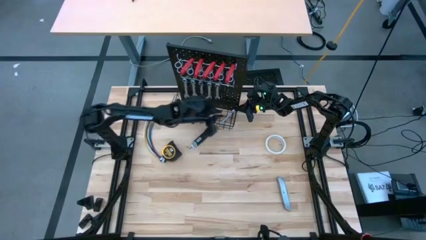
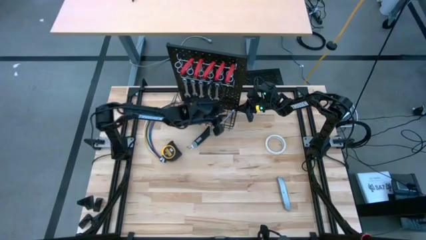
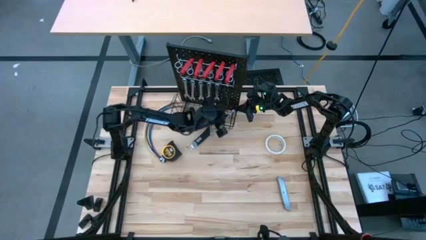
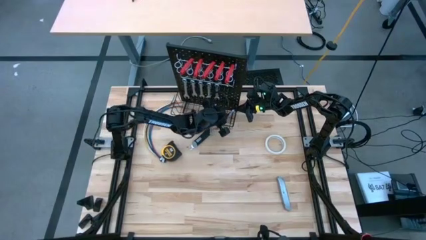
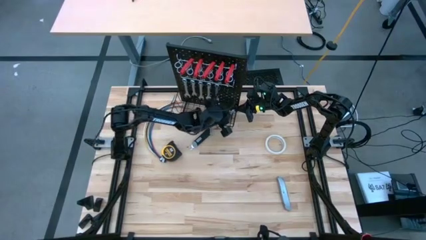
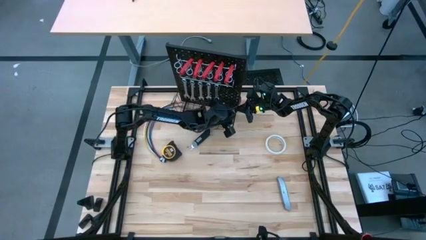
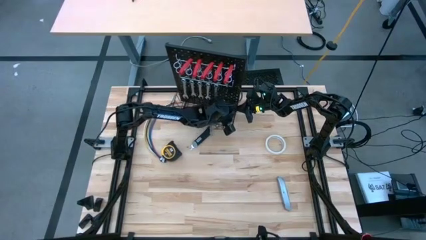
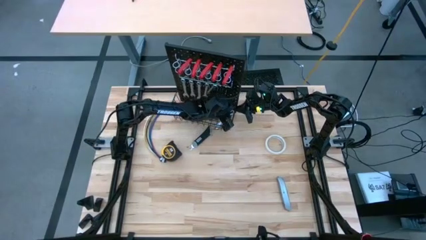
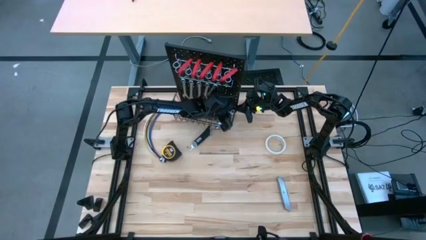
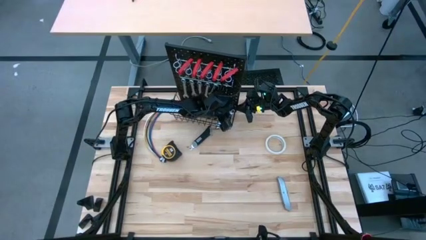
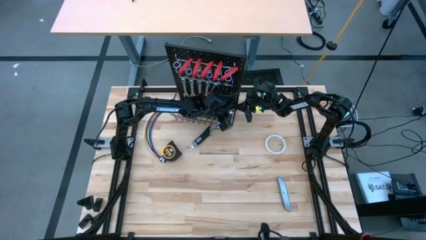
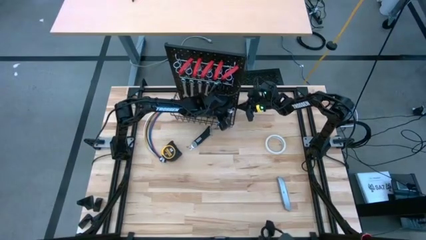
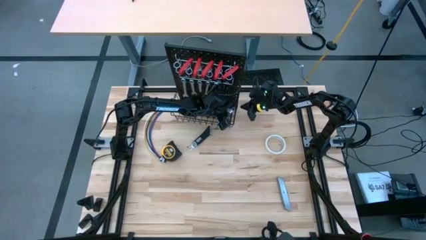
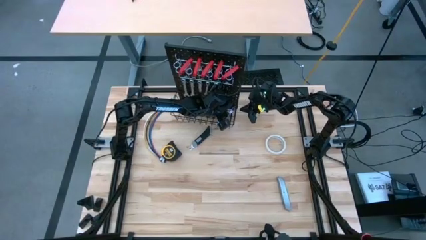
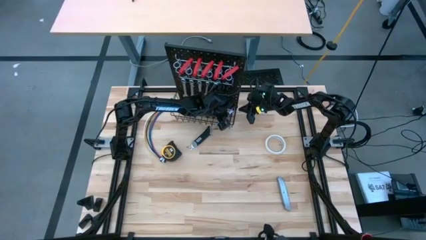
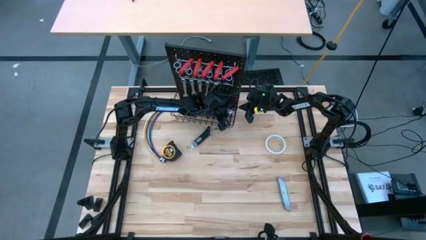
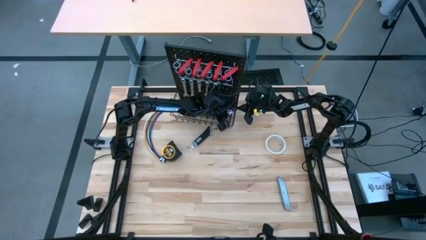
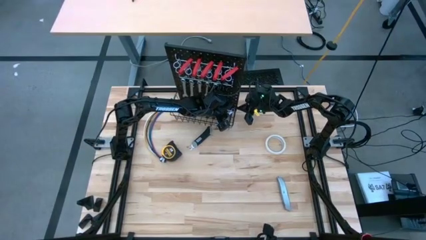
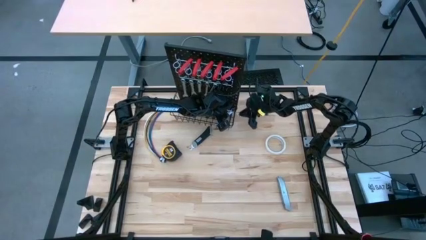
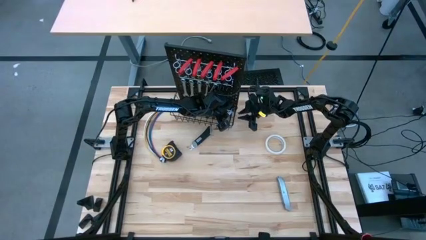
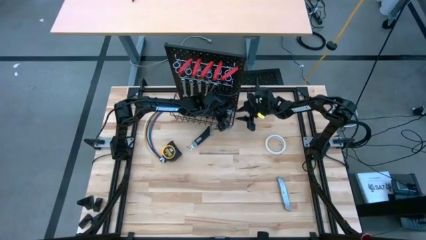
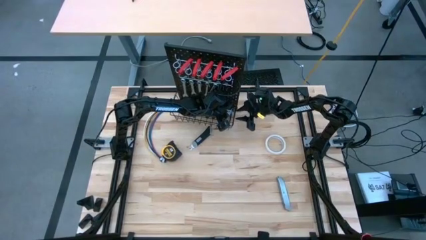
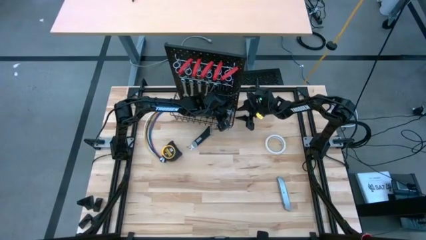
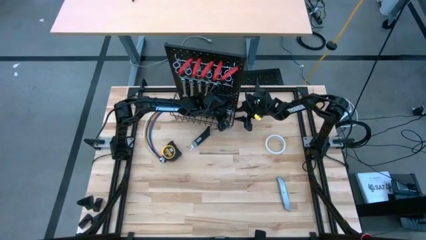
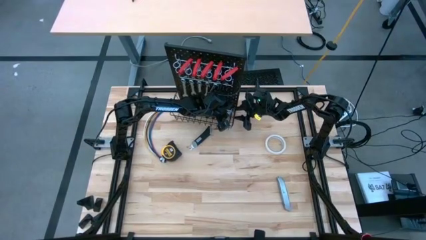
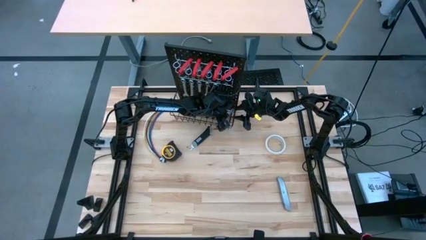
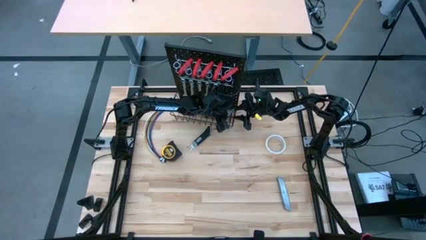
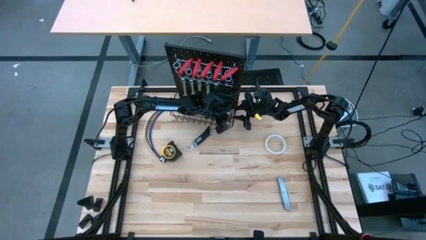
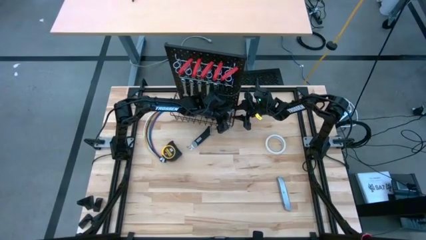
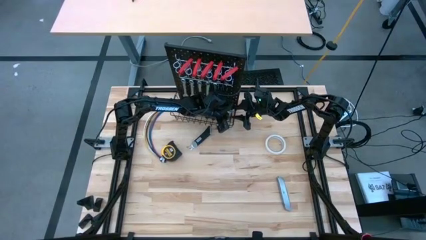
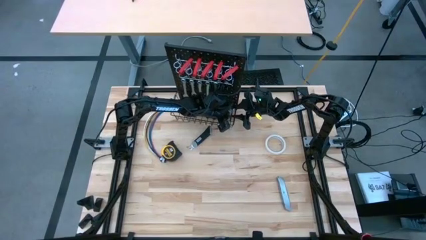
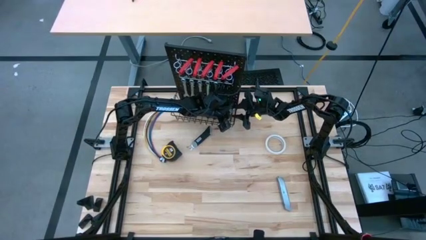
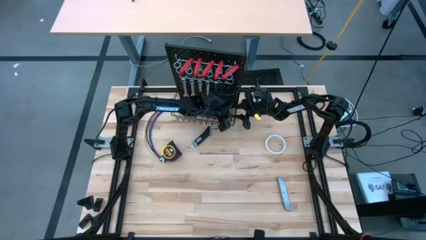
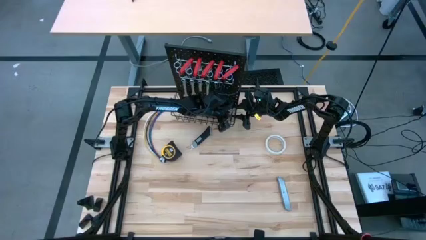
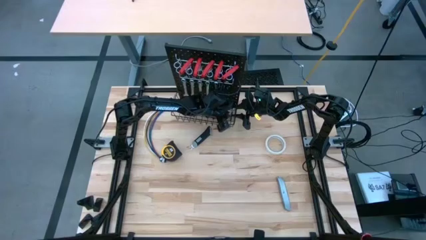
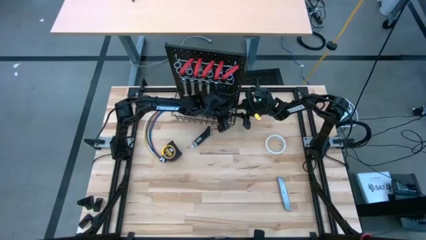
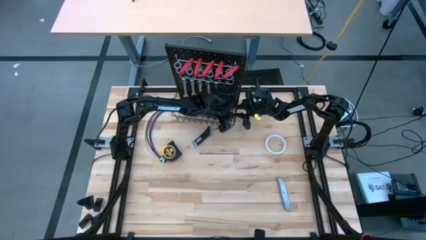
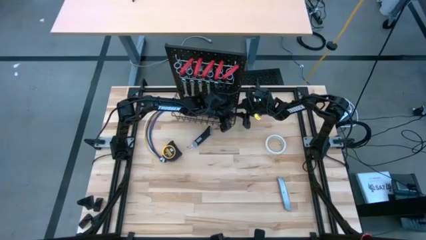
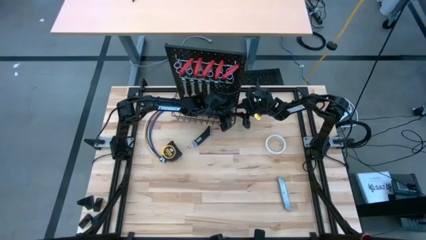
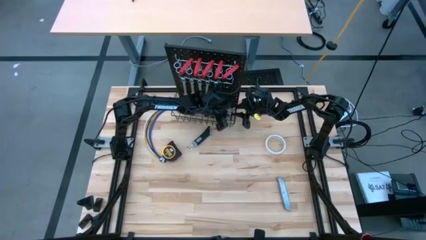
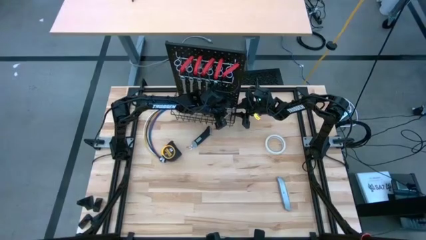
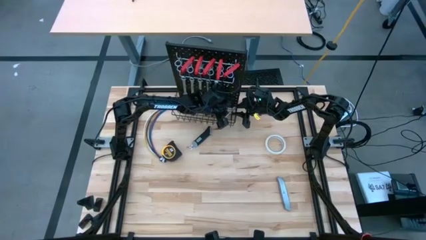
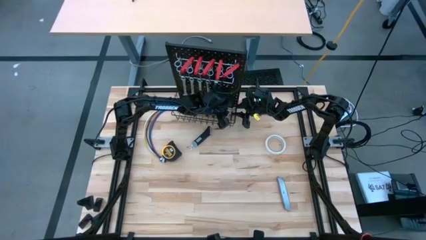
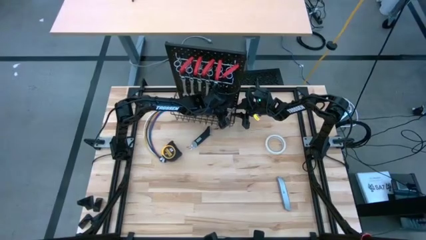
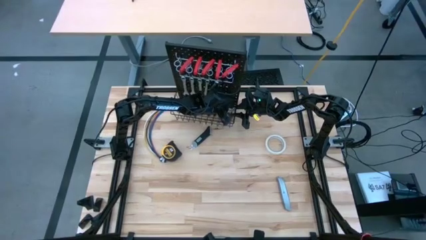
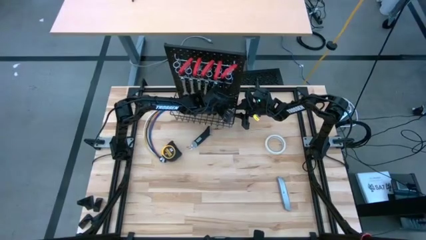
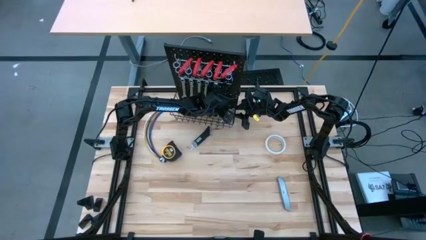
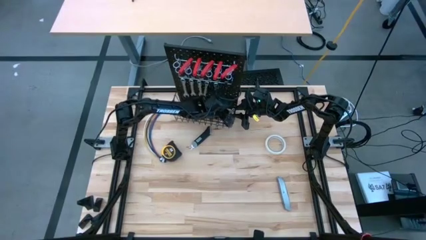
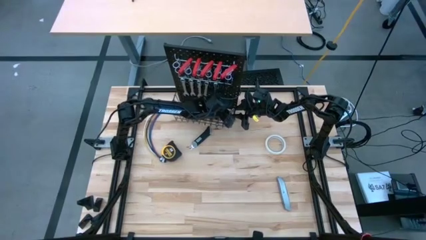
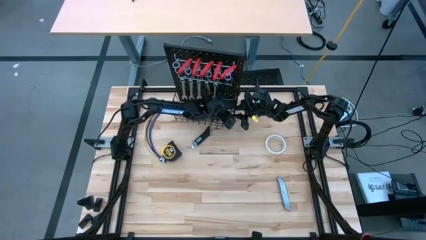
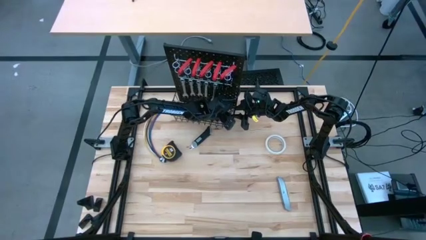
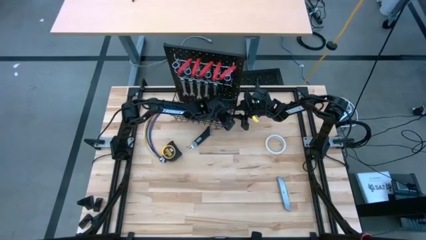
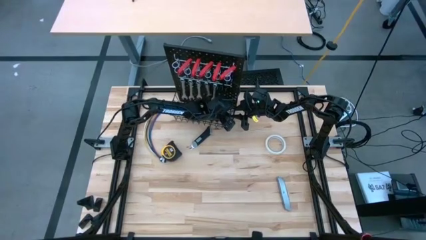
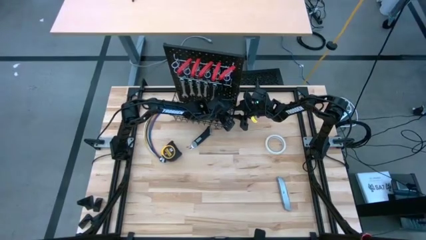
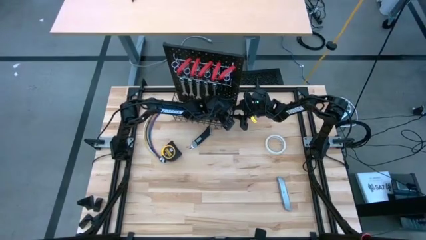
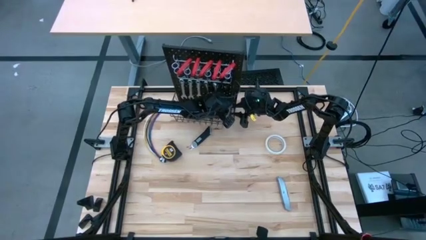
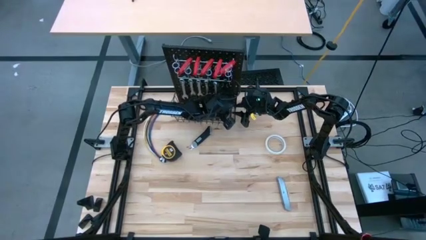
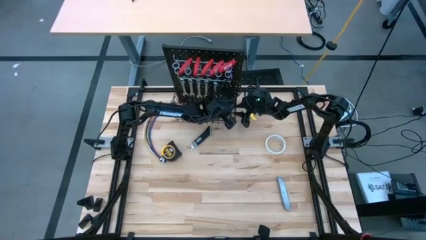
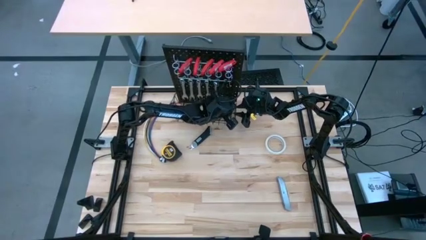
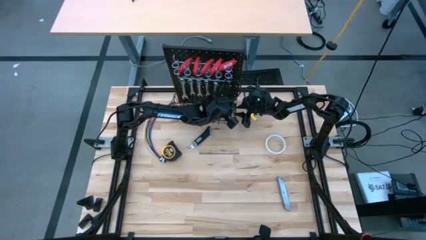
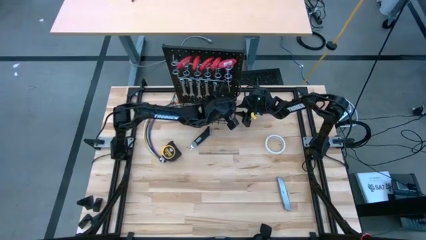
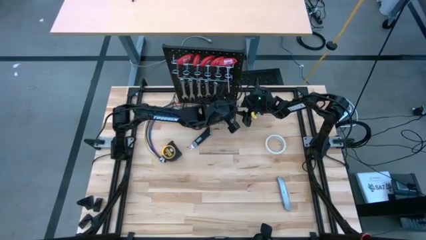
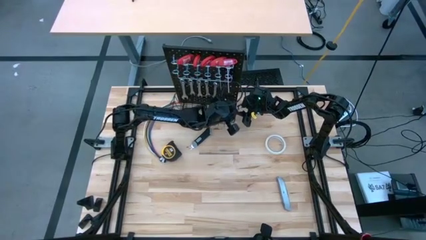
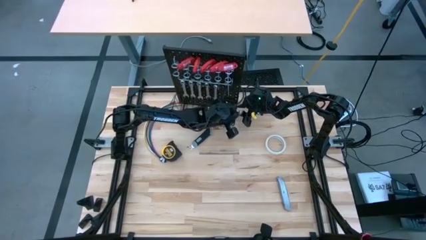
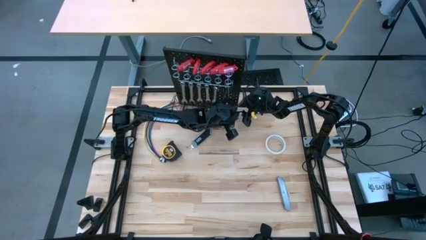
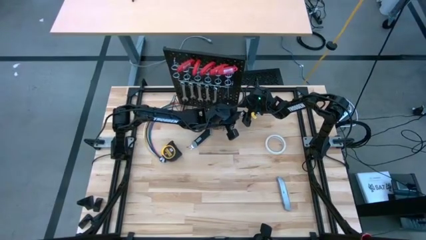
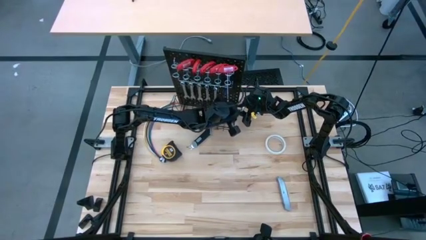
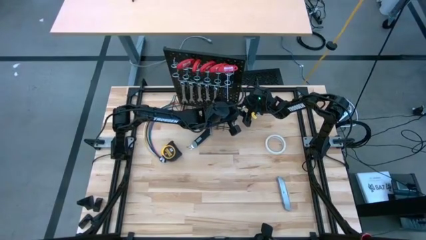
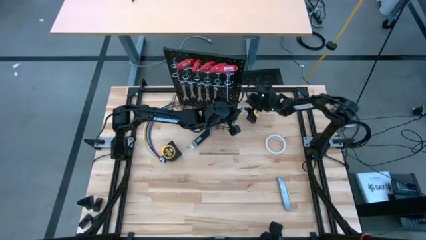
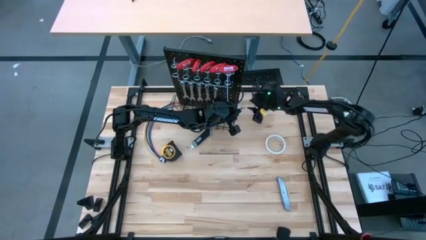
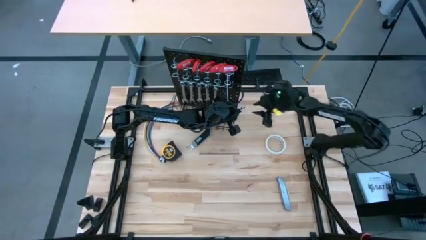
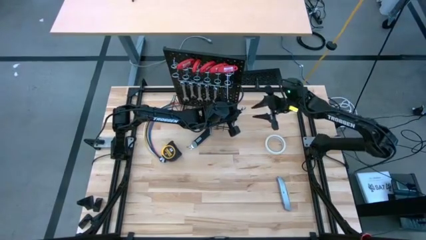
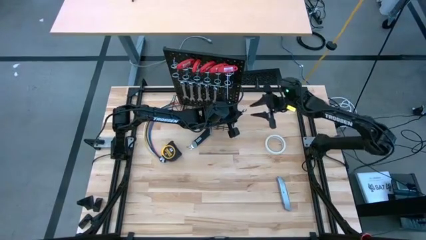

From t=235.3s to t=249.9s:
Task: Hang tools onto peg board
Hang the wrench on the peg board

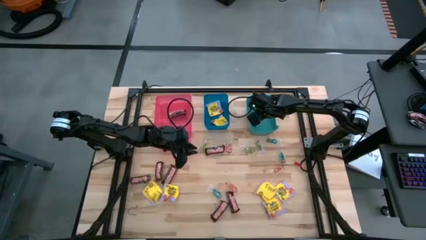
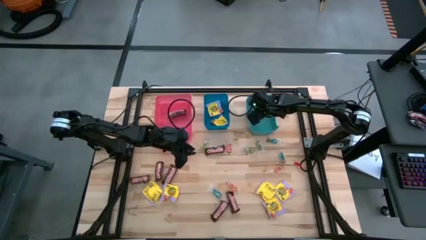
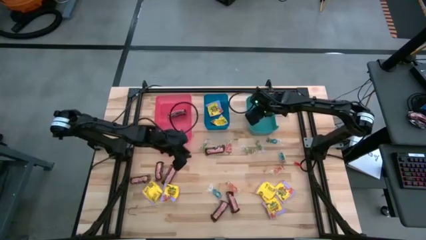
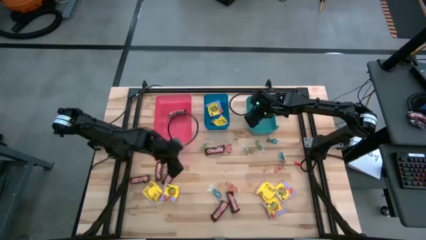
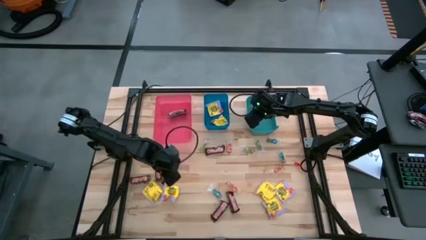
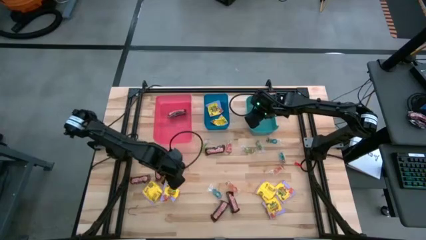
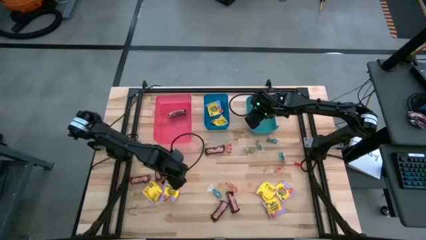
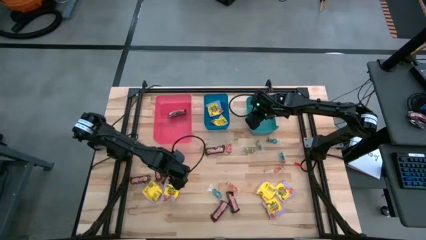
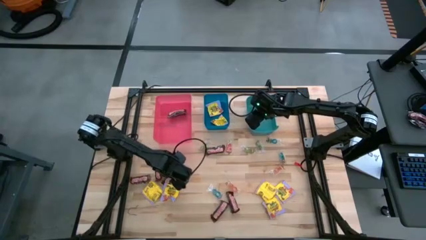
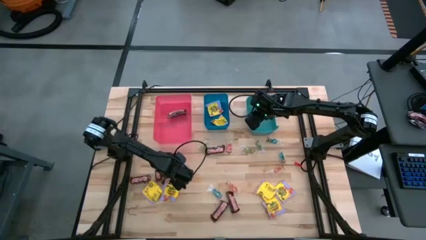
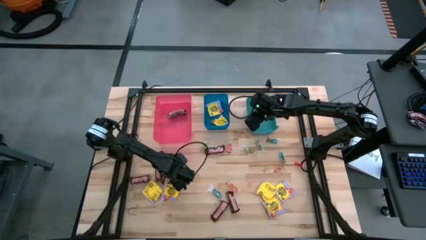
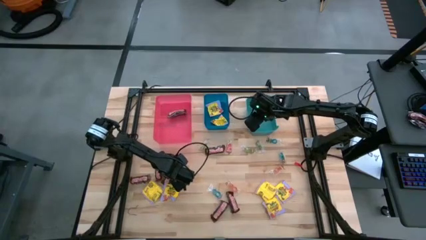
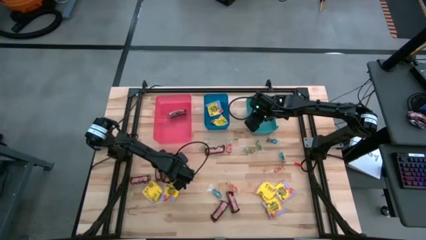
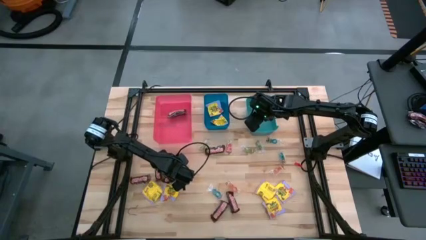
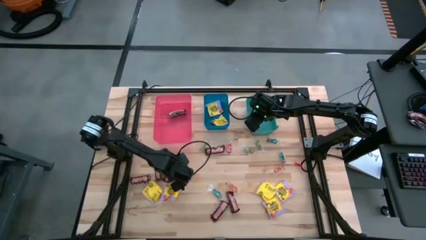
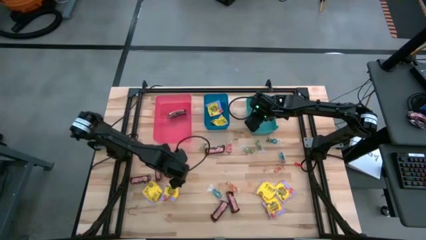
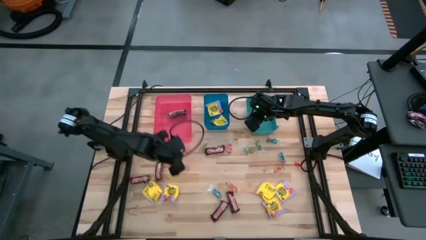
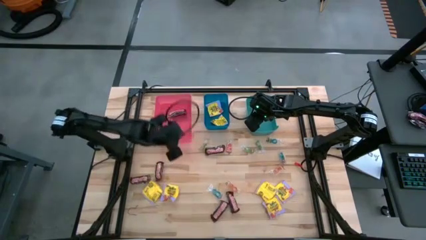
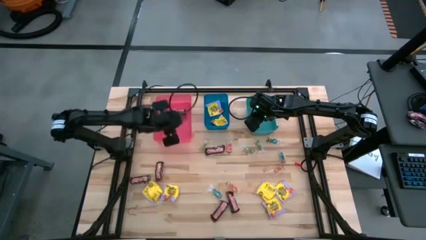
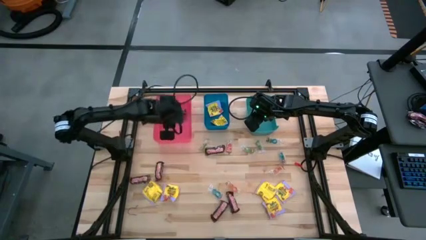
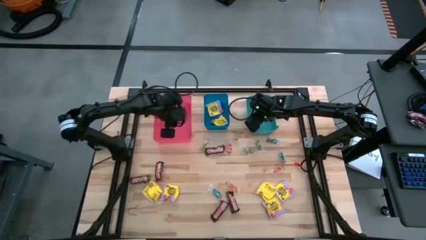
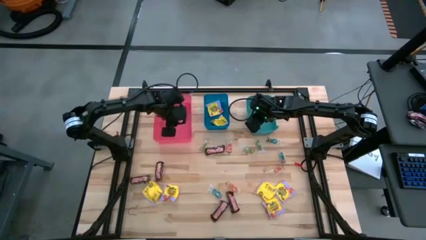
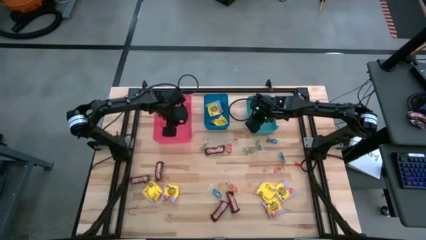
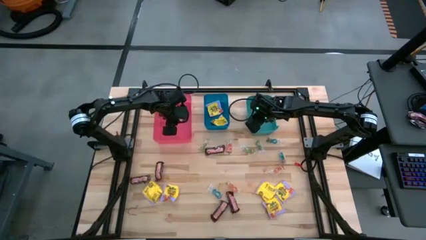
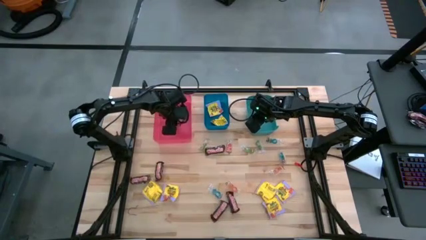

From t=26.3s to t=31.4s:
Task: Sort candy
Put the chocolate bar into the red bin
